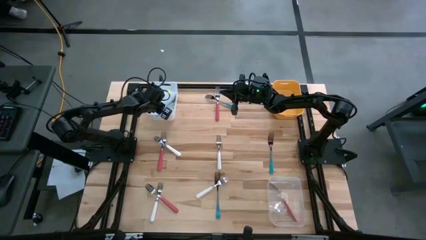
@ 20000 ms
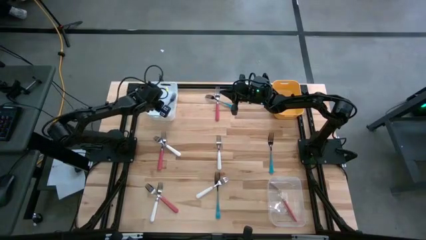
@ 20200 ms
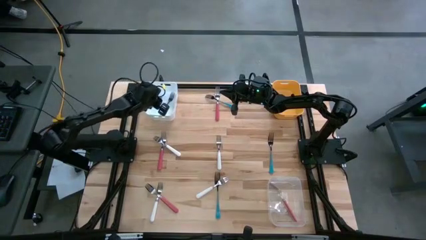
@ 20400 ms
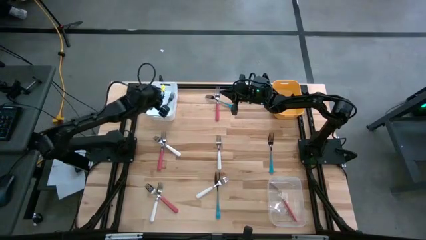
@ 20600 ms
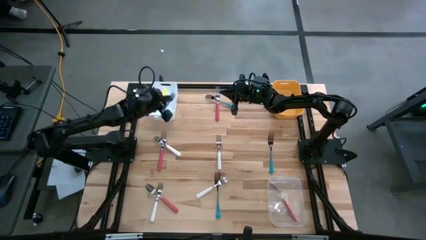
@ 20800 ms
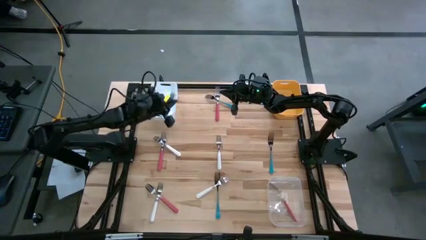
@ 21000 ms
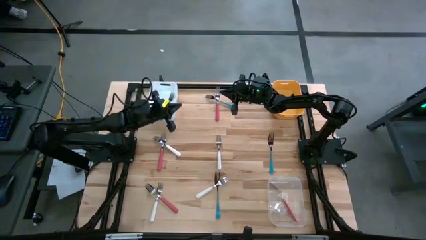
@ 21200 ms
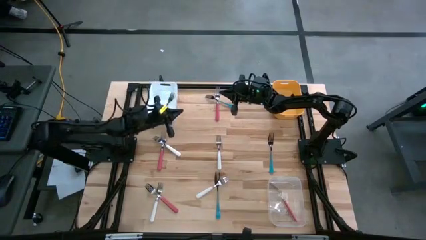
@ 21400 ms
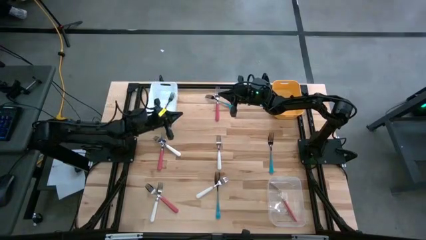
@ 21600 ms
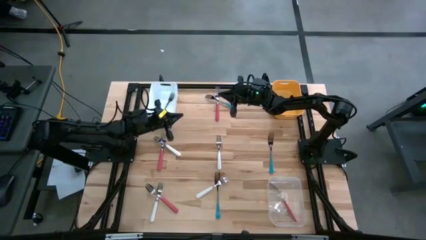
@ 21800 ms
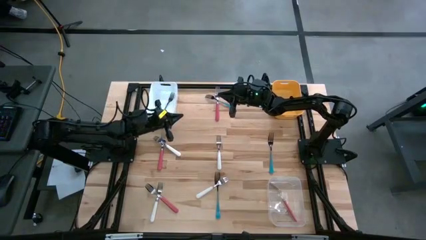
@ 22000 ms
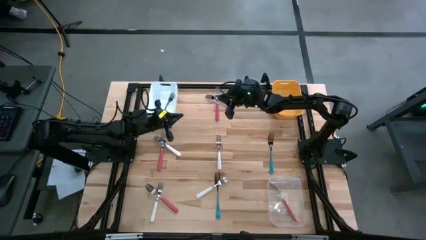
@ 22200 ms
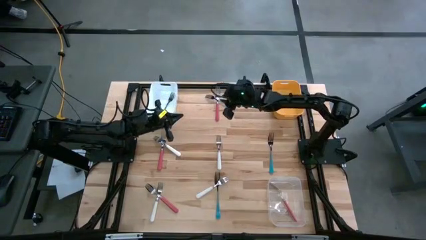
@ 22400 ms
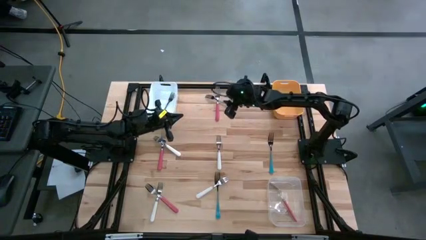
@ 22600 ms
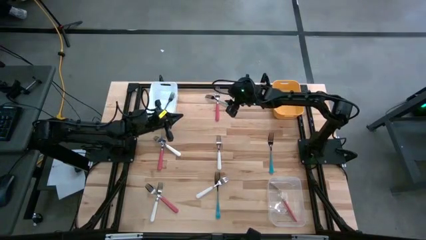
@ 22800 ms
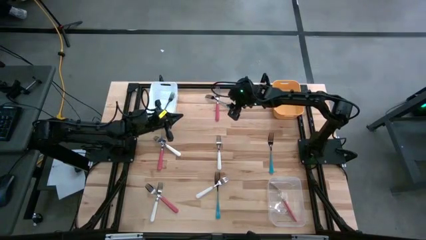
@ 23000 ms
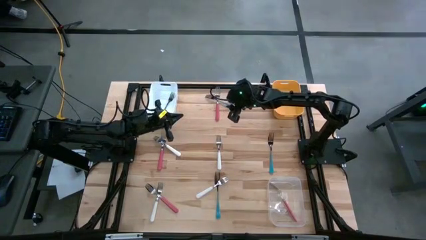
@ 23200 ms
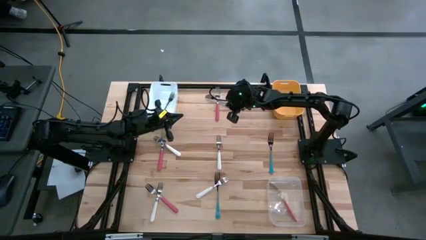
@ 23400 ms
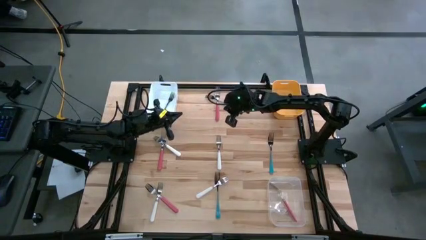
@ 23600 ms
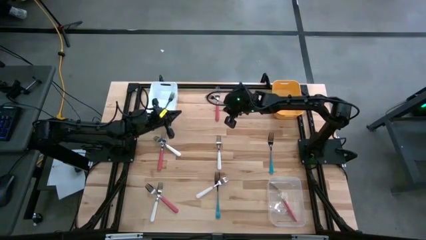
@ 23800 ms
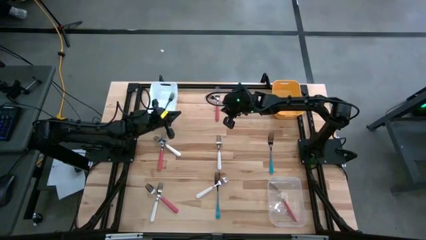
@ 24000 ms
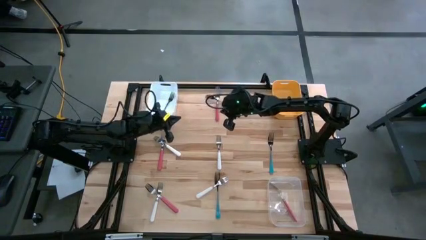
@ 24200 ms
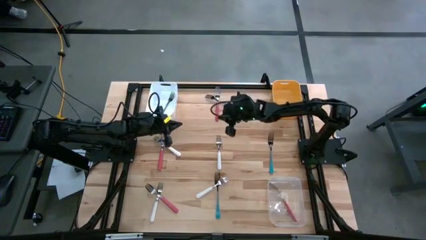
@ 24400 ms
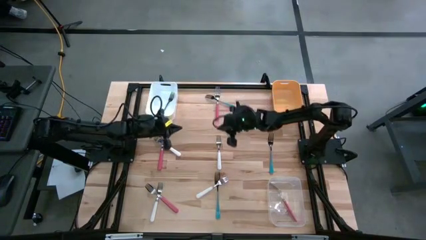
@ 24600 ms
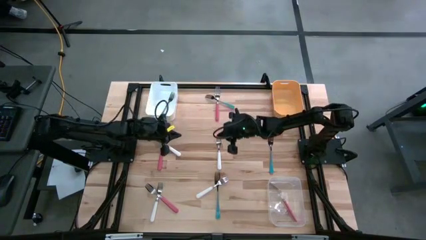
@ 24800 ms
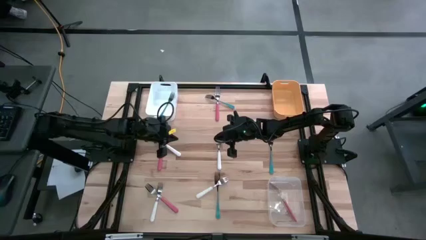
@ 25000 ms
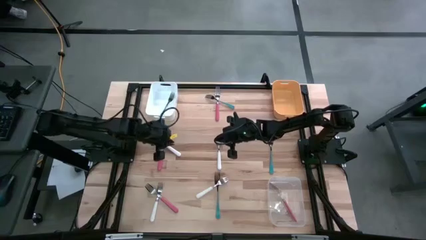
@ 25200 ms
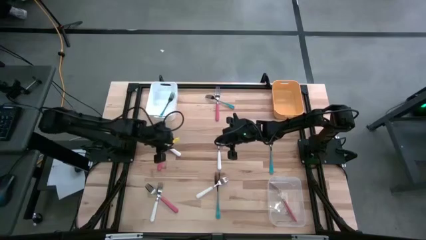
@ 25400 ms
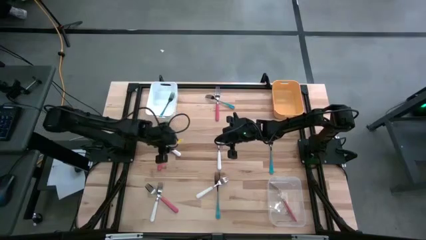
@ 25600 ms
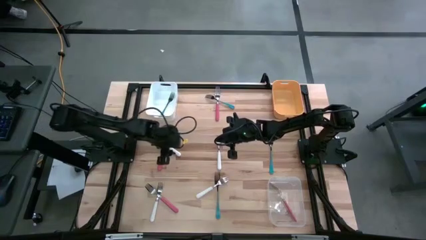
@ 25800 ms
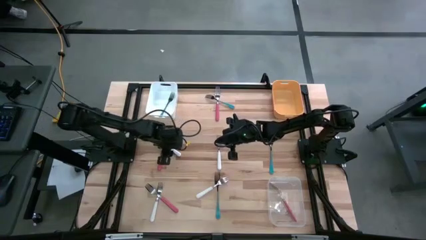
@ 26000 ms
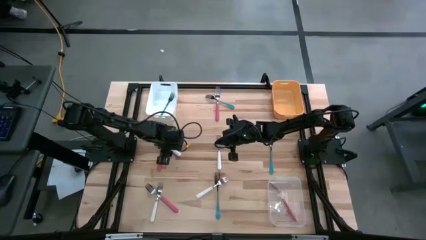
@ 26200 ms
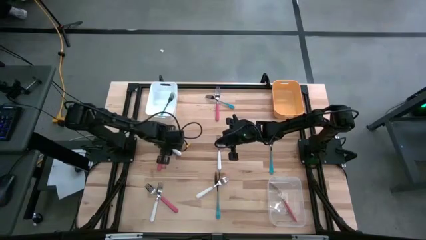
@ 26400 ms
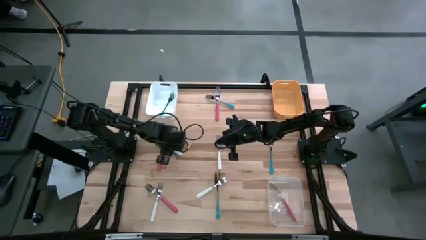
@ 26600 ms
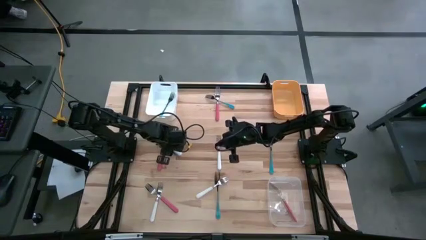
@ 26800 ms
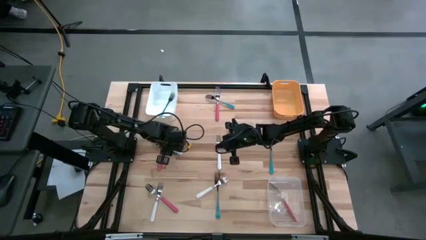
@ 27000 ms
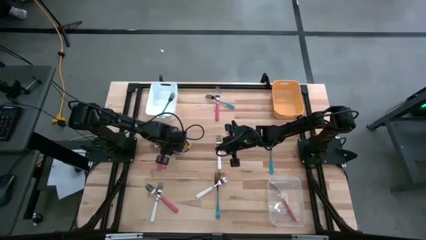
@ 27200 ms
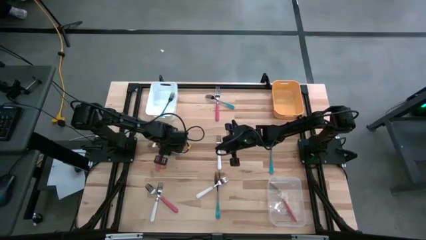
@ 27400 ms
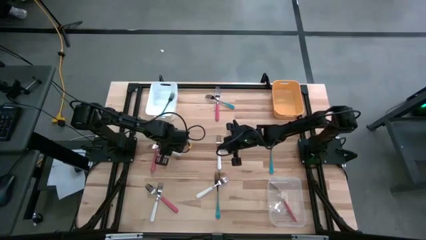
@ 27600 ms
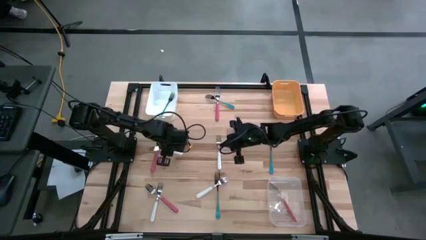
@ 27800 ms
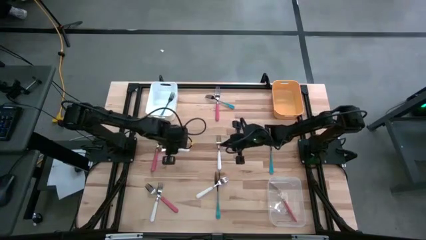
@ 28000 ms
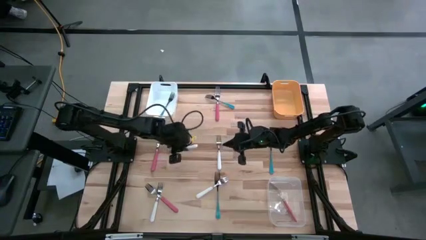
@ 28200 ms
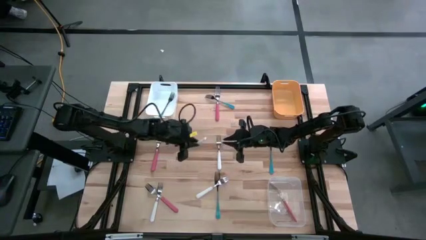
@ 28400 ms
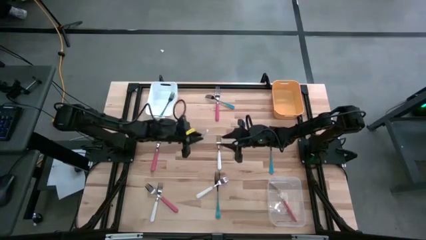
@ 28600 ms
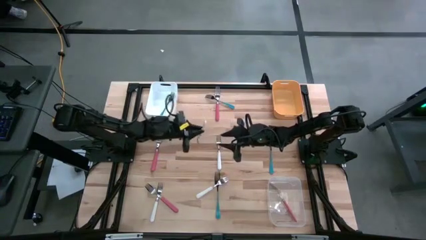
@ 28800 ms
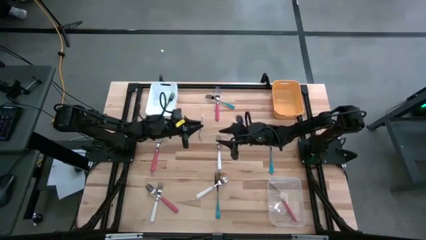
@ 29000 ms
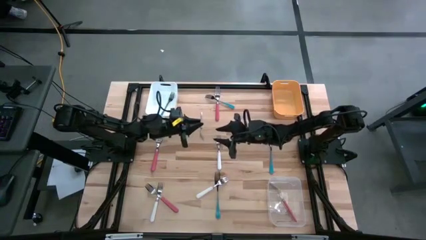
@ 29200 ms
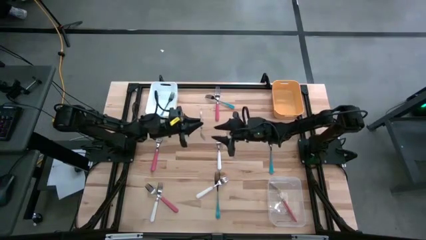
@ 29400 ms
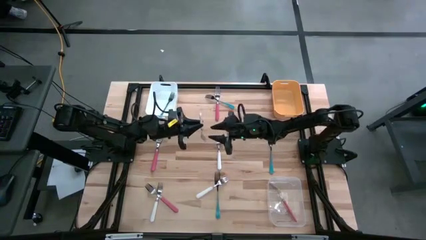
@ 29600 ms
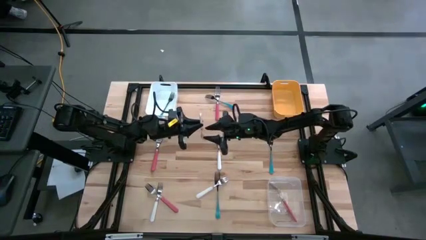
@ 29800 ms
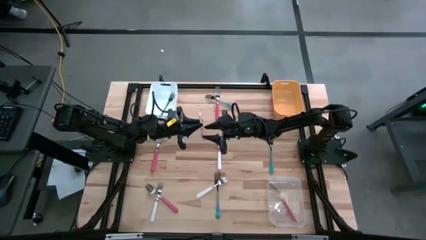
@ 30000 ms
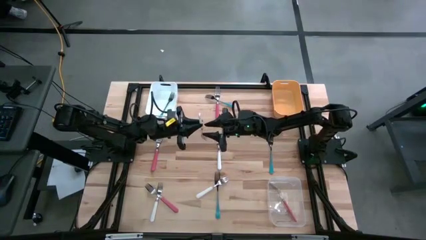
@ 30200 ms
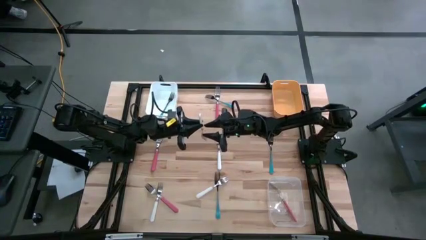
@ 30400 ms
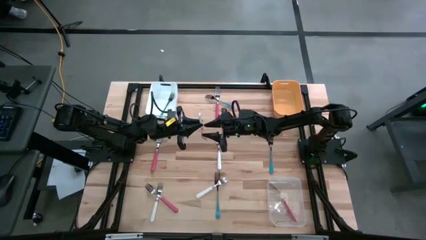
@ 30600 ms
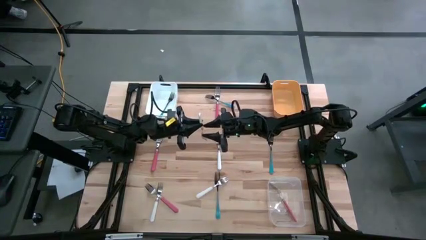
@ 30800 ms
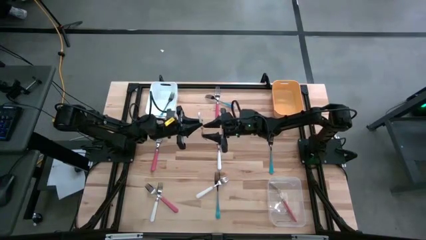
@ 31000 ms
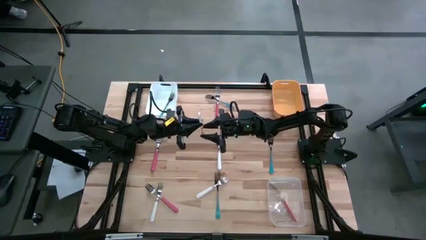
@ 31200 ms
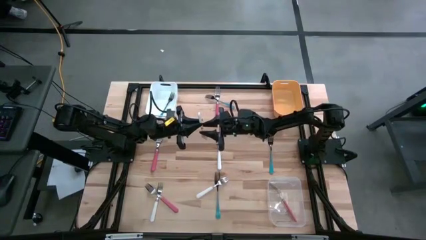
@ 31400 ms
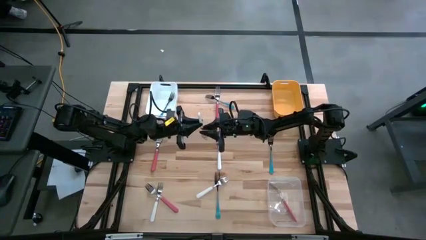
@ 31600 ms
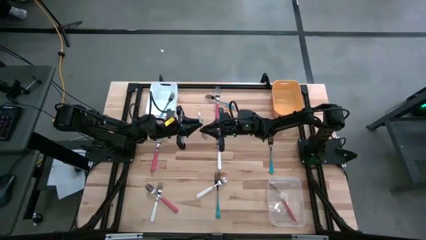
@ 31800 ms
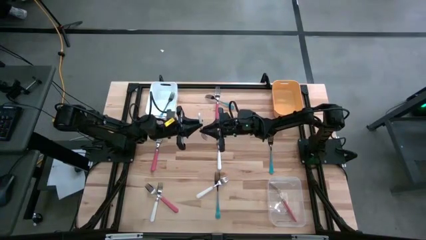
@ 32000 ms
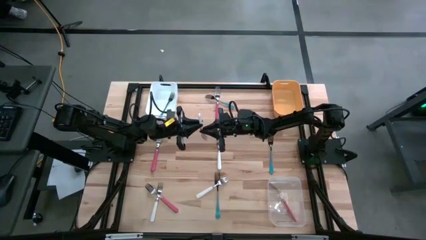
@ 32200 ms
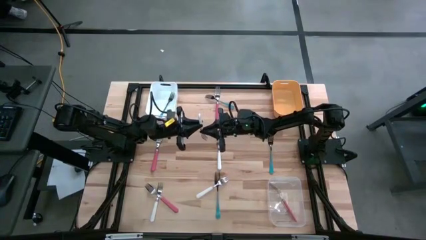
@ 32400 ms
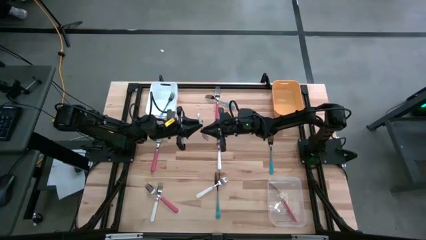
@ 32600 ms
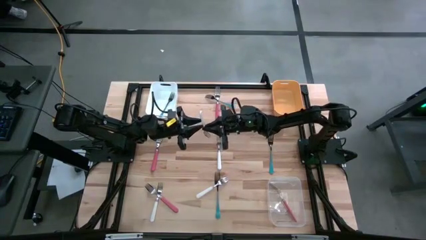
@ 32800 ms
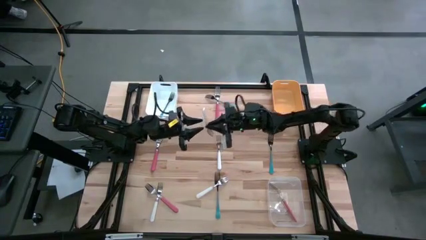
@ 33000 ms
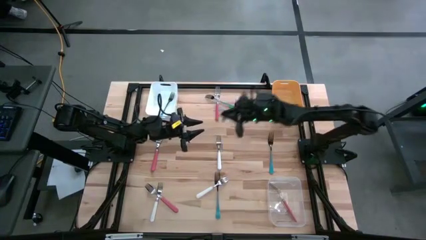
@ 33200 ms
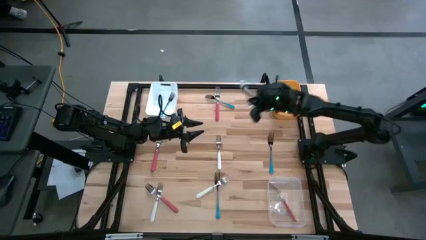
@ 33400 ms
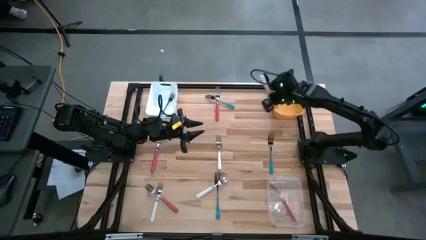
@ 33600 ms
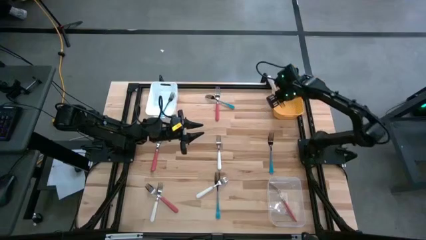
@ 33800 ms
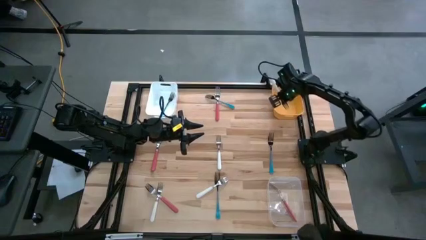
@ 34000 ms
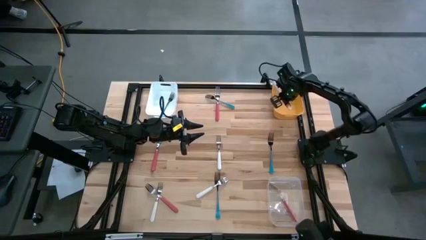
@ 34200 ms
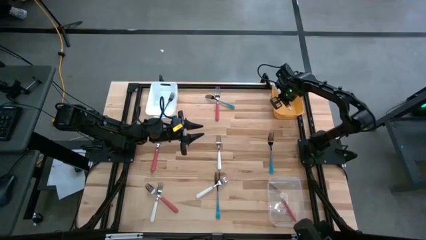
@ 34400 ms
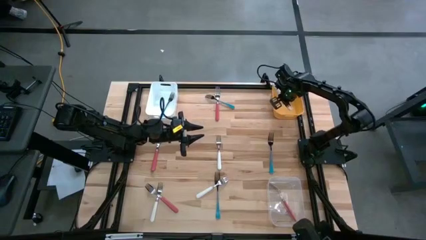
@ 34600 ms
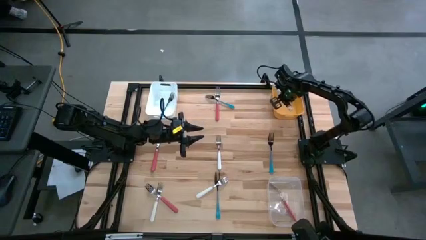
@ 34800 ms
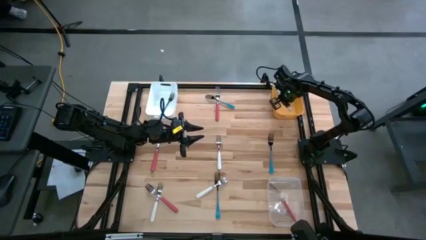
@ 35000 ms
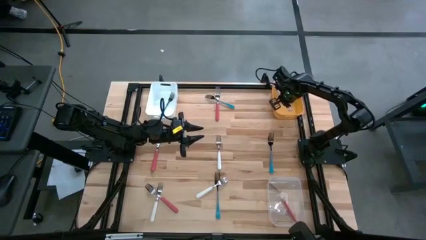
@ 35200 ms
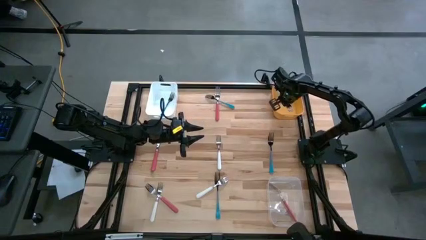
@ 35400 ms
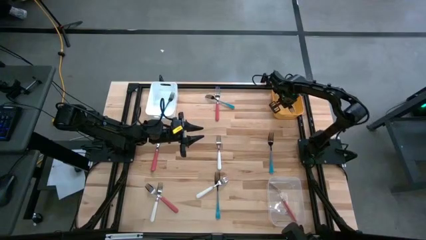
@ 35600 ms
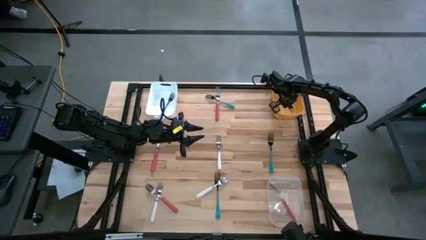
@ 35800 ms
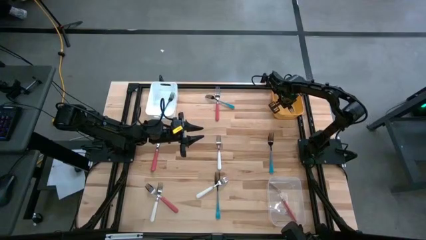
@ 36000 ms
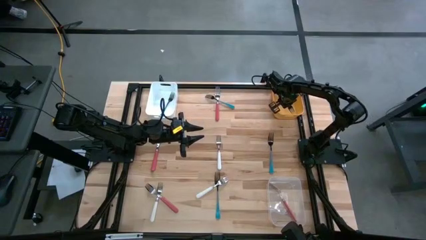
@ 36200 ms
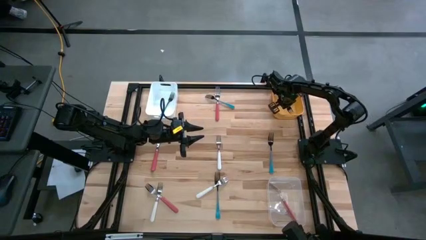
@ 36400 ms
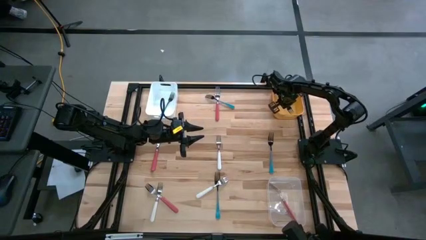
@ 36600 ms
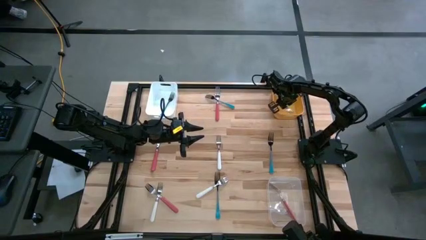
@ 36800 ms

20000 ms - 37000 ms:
Task: Sort silverware by color (type)
Put the middle left white fork into the yellow bin
